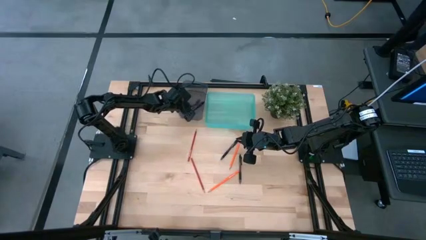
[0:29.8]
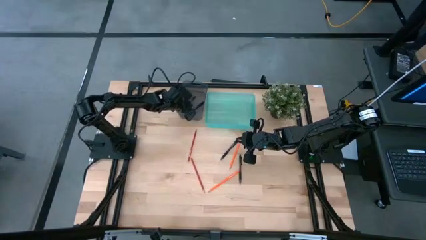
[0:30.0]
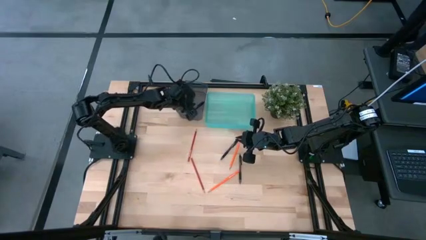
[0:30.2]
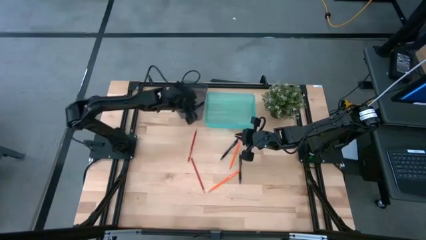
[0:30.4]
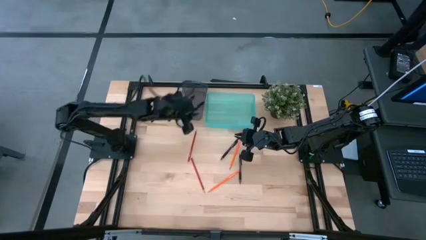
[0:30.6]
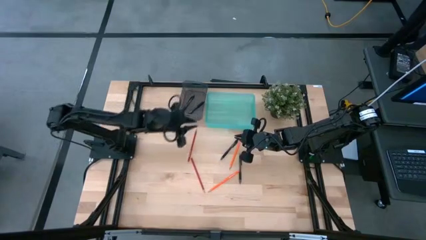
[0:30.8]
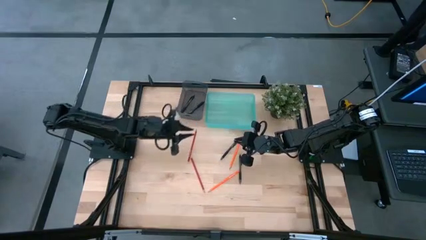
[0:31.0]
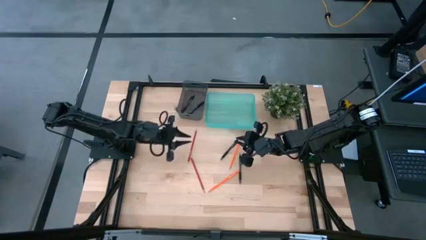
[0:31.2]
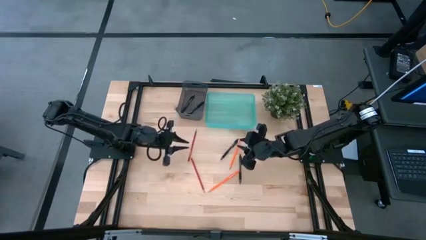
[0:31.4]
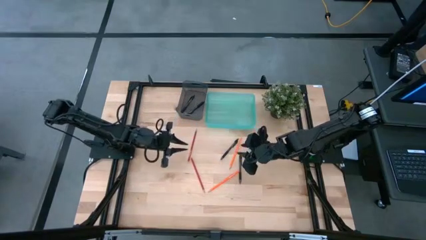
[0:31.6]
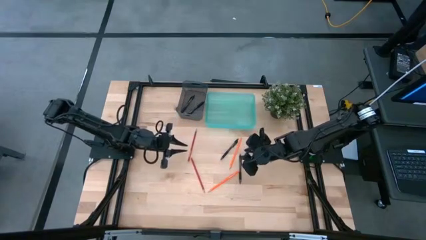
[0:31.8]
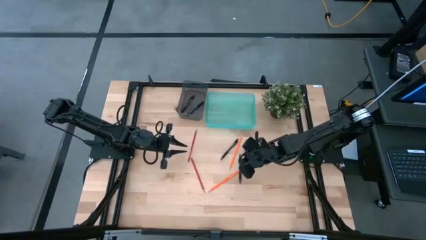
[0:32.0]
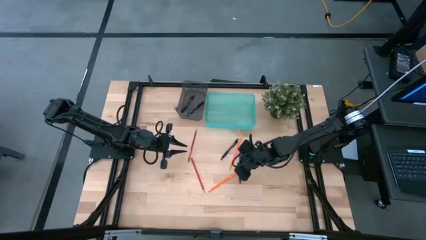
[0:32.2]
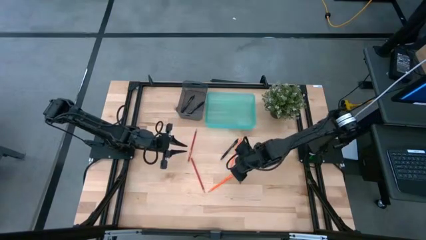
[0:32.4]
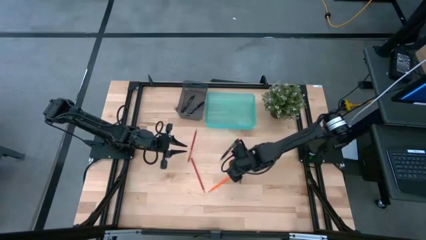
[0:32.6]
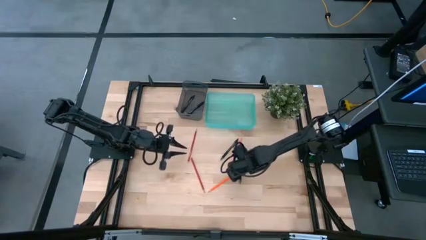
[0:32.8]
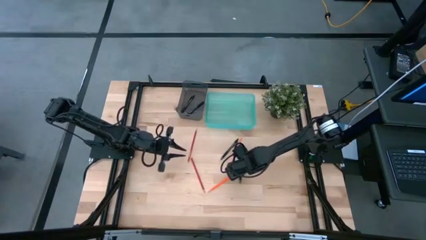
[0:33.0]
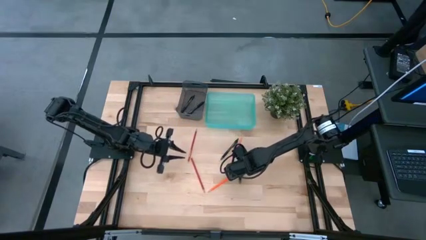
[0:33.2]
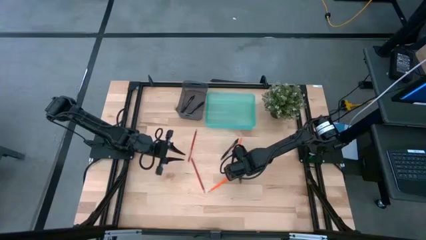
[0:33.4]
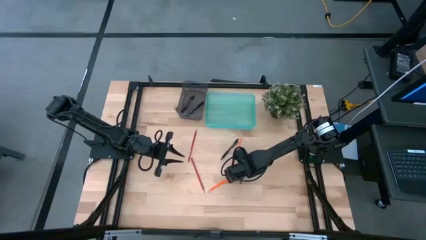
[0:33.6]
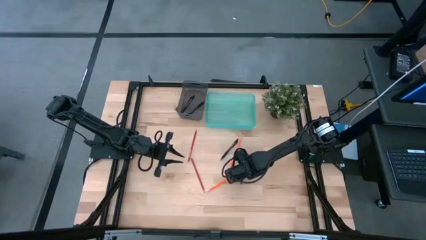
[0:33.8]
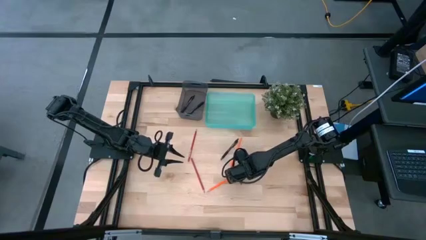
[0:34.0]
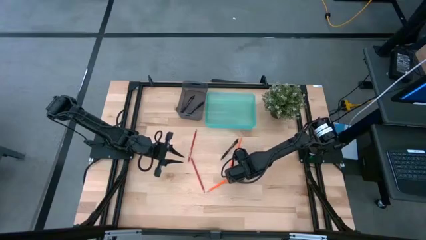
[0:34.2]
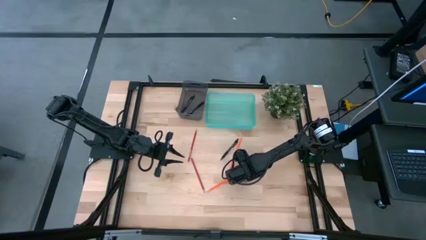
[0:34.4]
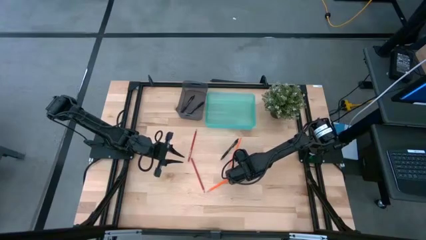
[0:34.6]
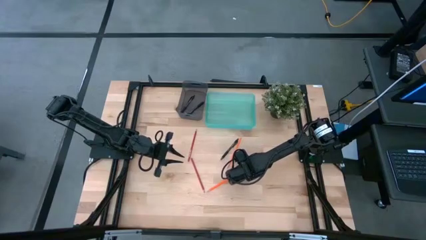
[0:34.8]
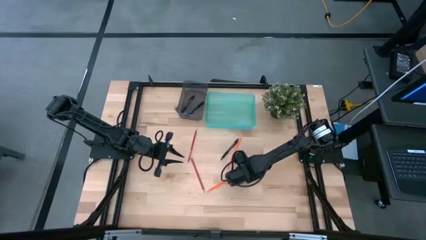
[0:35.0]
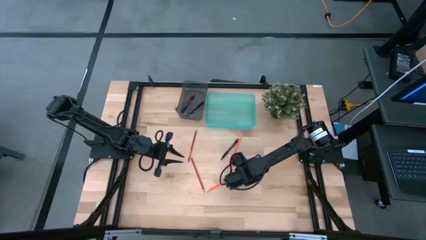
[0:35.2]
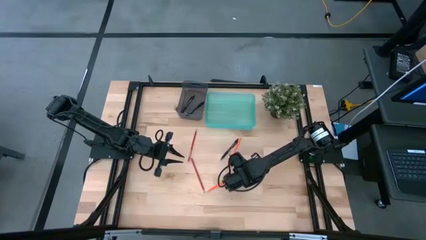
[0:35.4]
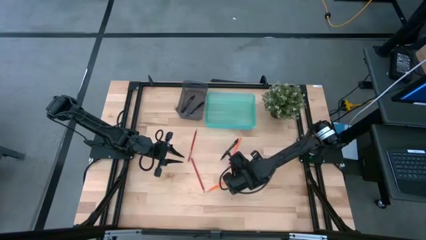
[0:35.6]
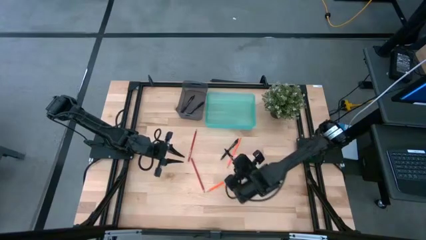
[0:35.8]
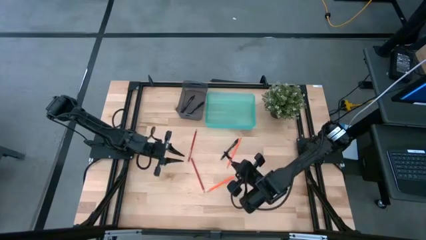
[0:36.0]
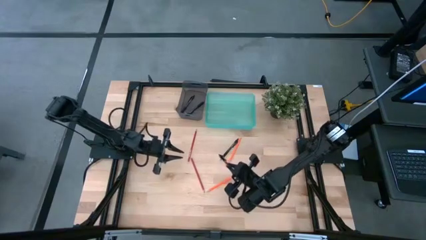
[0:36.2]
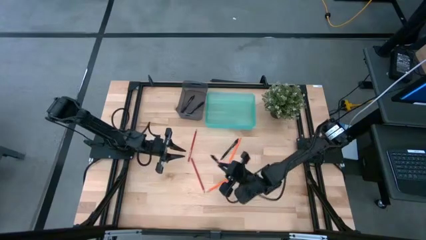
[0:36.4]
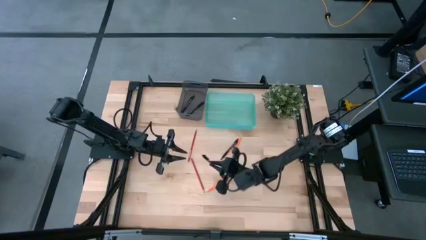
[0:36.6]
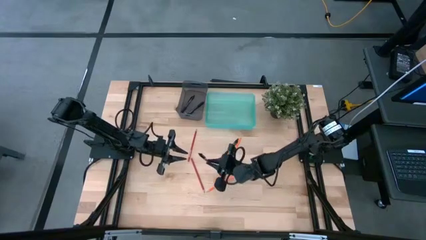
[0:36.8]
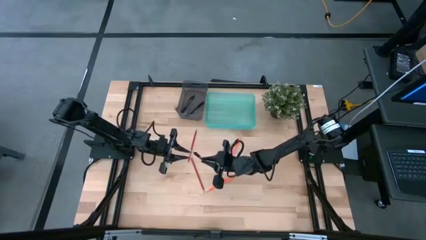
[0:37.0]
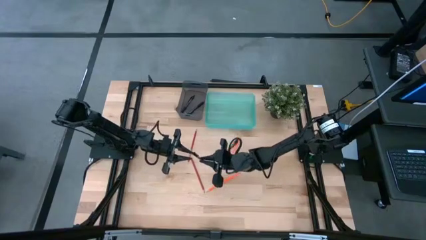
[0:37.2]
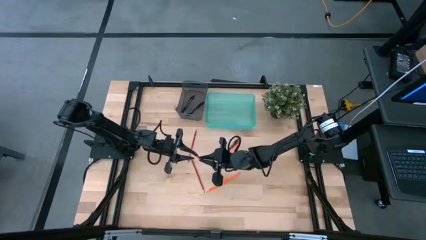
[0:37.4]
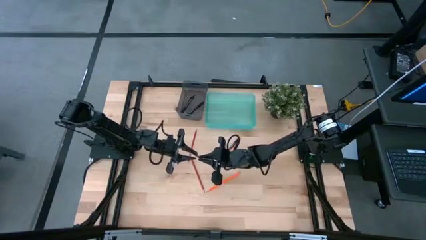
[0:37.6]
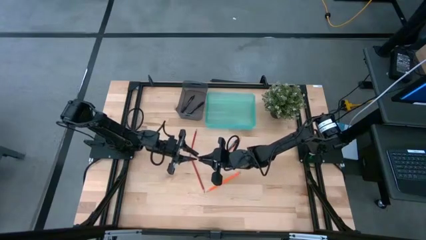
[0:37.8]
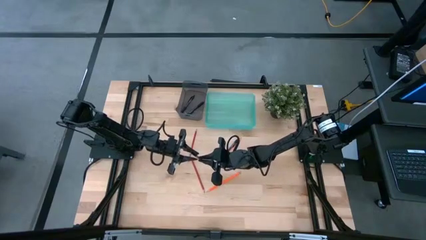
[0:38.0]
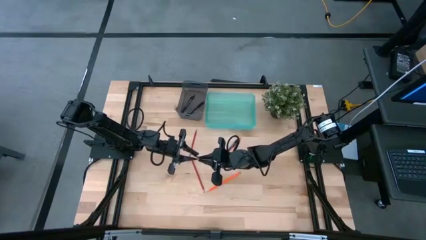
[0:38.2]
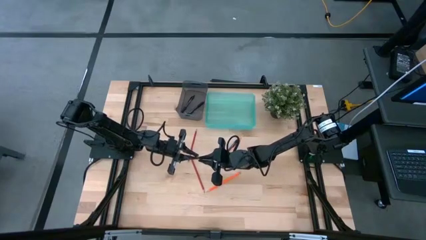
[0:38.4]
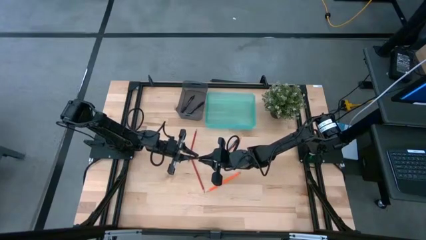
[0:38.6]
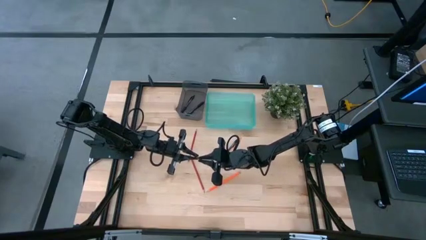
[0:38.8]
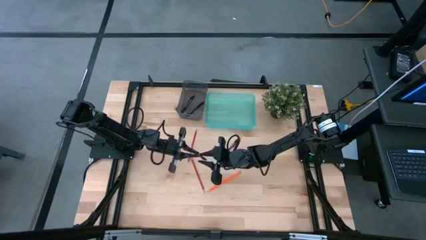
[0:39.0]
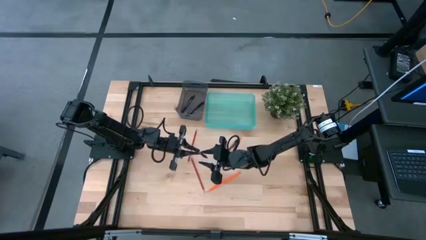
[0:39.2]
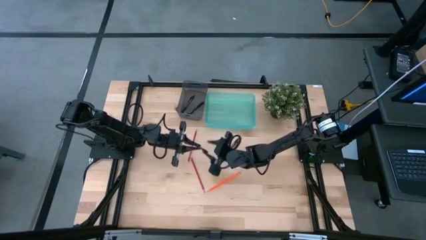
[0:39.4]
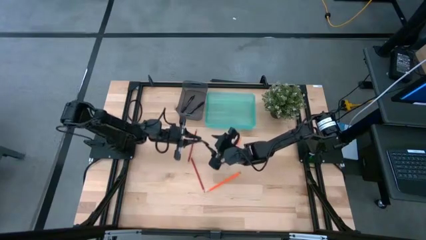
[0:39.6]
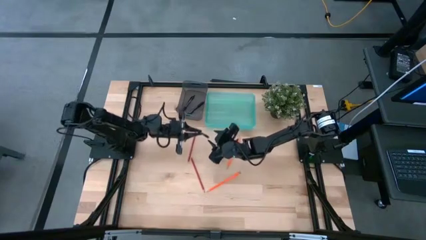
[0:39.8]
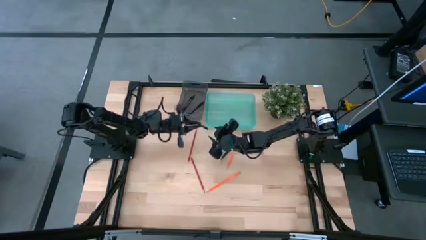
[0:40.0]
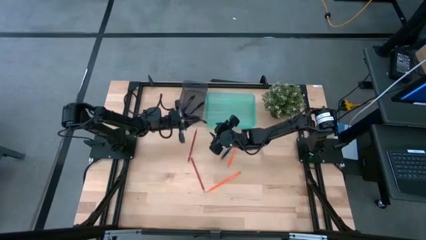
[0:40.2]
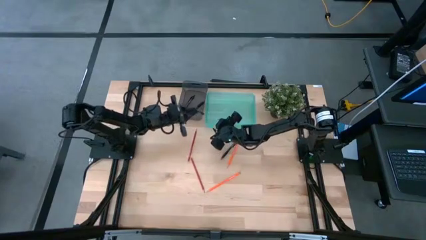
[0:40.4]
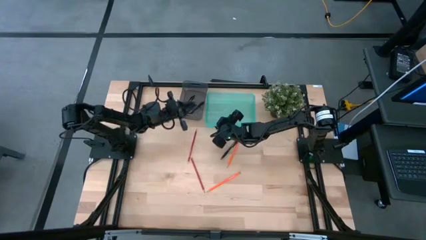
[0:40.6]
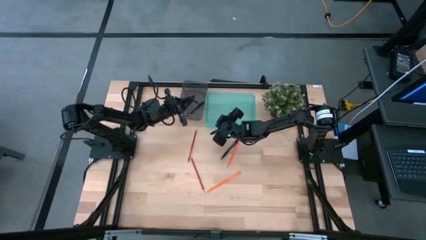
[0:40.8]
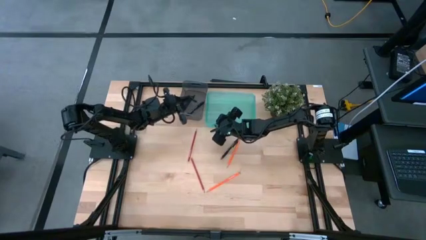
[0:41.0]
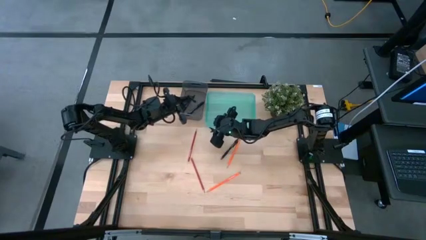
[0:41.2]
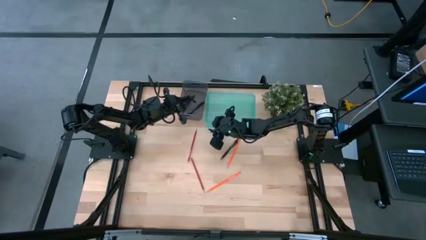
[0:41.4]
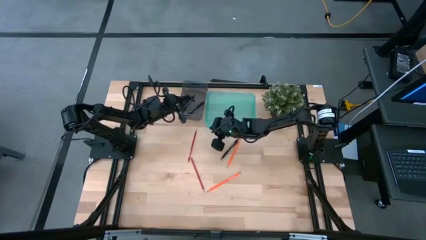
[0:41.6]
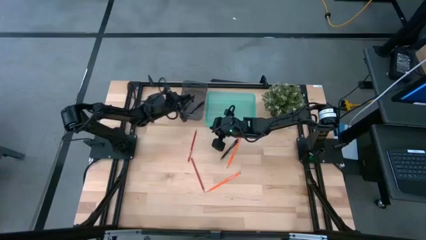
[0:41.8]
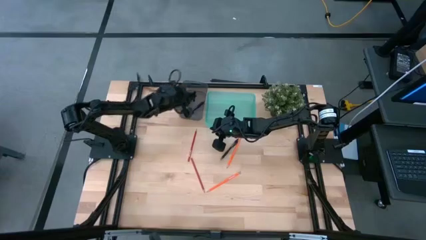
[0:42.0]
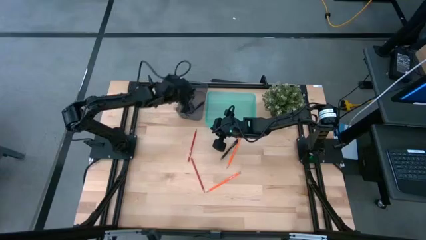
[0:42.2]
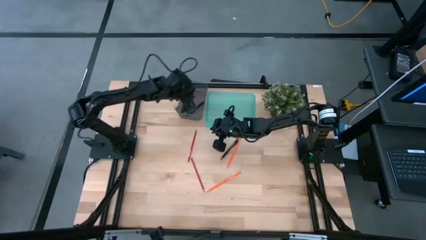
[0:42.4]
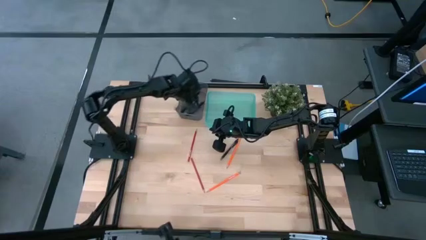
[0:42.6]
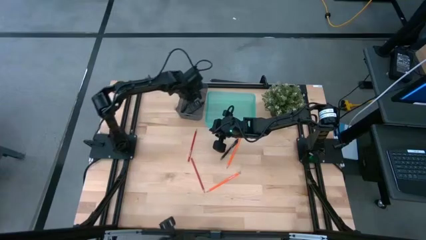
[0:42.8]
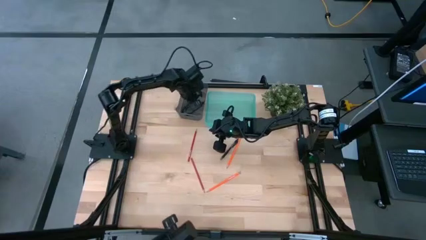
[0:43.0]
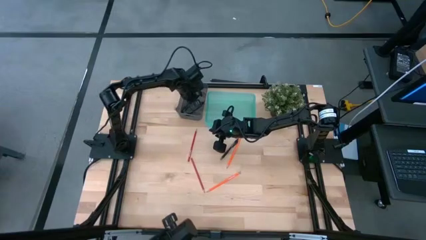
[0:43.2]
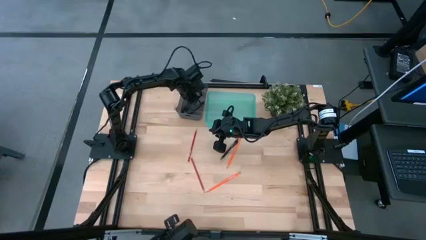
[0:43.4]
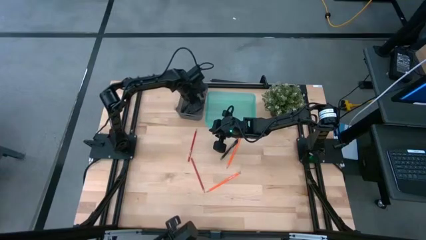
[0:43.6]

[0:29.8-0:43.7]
Task: Sort pens & pencils
Put the black pen into the black bin

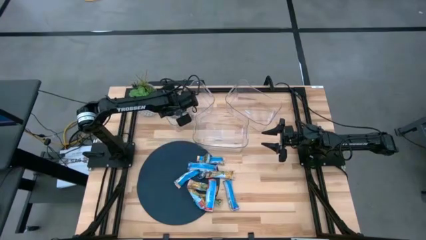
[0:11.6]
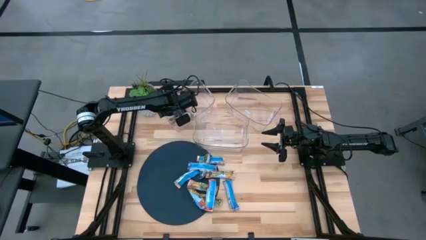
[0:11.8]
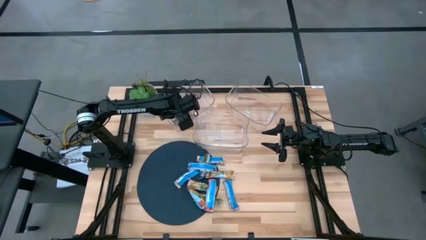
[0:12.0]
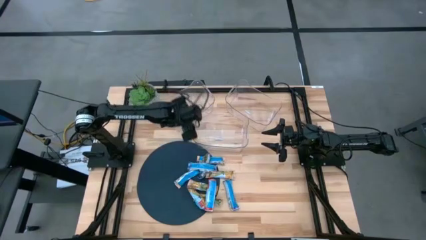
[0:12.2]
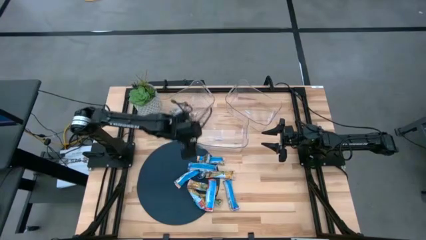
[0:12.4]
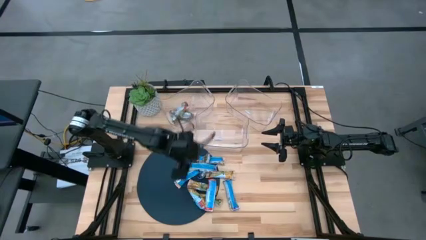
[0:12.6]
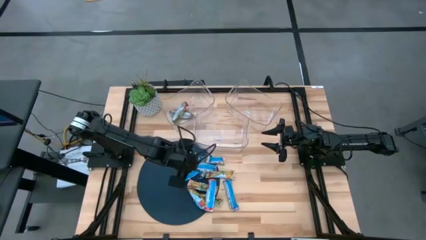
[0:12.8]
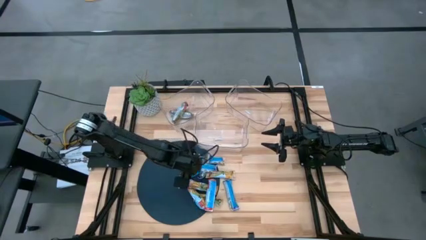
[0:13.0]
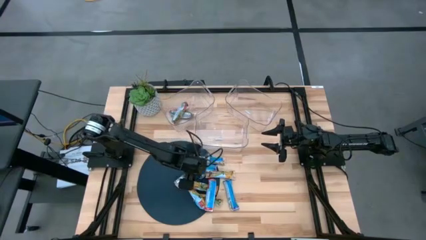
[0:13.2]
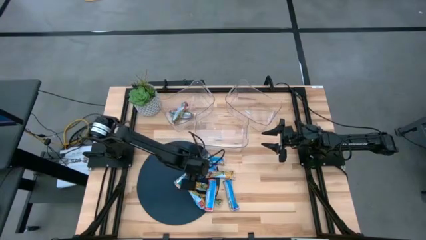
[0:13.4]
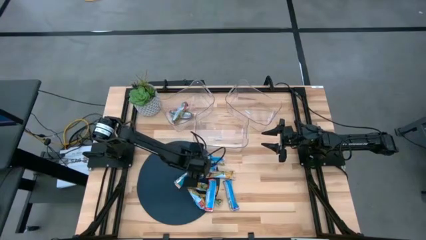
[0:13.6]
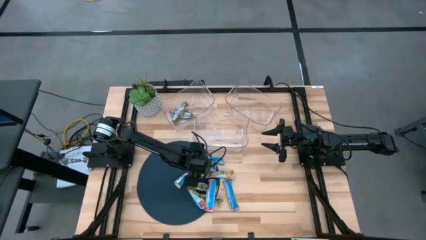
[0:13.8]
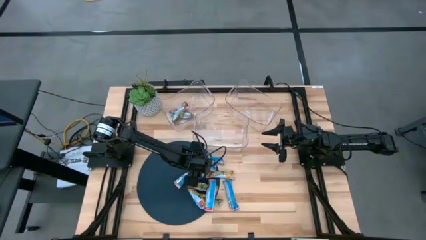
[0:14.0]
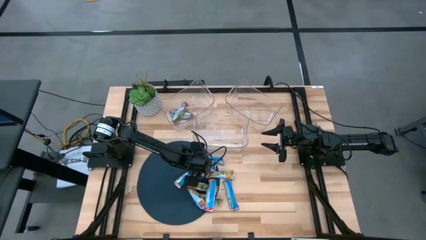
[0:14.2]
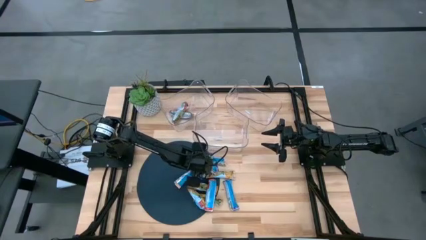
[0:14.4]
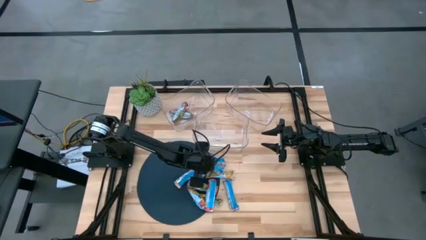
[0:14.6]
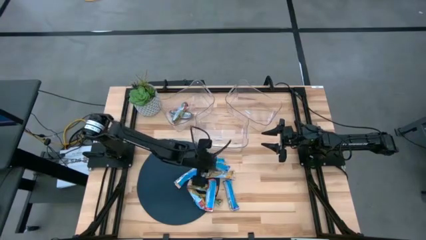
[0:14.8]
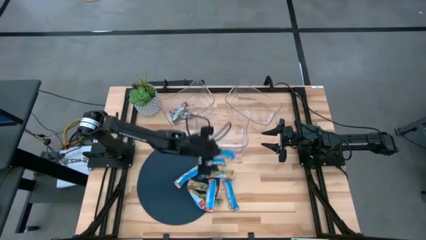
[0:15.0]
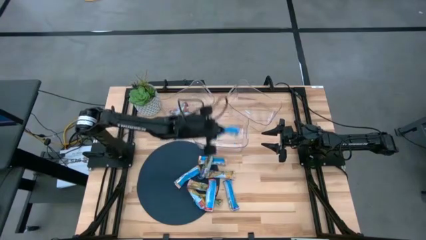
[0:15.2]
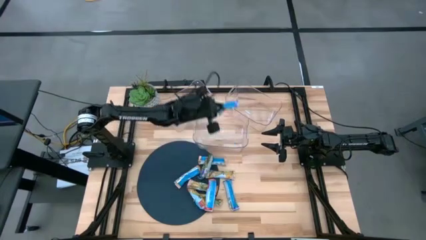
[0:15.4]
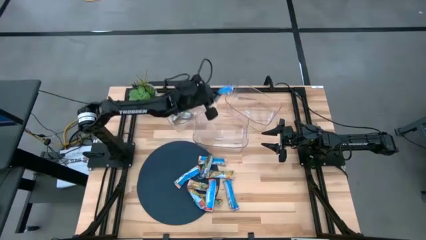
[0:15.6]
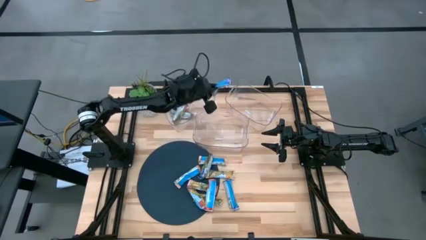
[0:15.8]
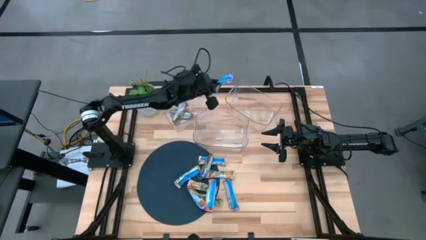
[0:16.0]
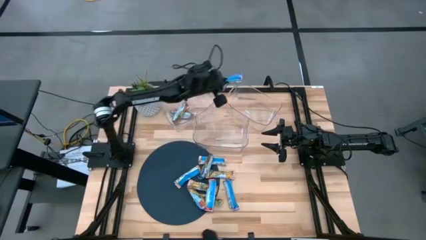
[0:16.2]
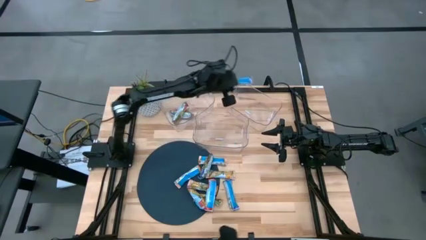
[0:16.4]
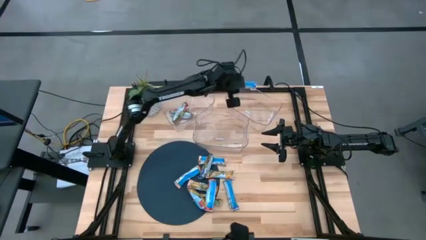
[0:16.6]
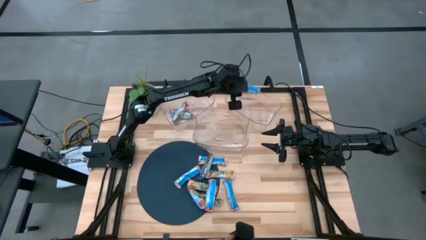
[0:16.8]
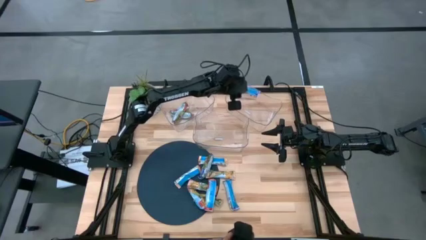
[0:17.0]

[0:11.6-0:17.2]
Task: Pick and place Granola Bars by type
Put the blue granola bar into the right transparent bin
